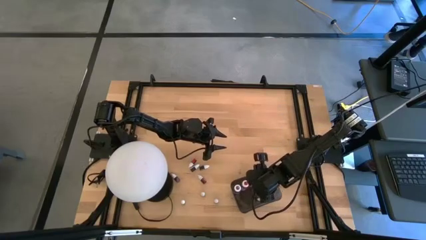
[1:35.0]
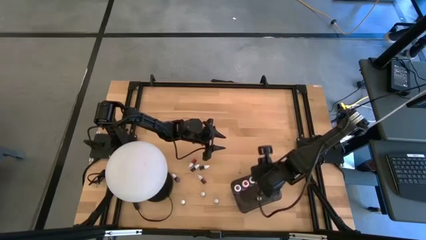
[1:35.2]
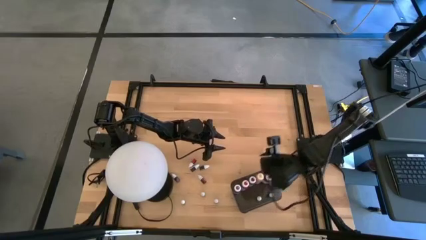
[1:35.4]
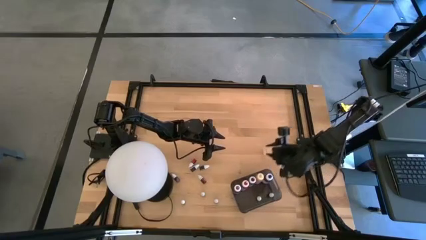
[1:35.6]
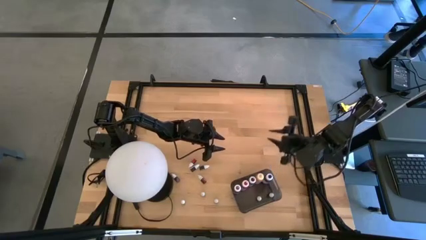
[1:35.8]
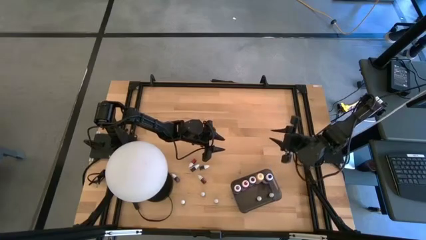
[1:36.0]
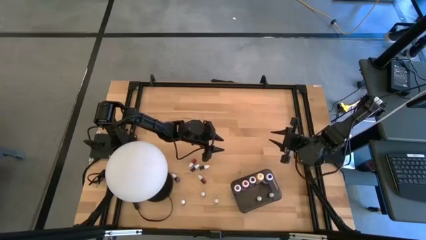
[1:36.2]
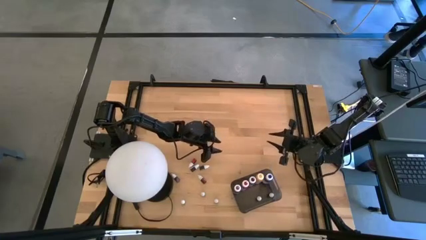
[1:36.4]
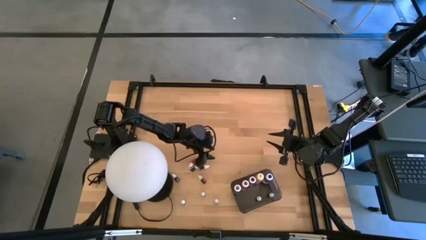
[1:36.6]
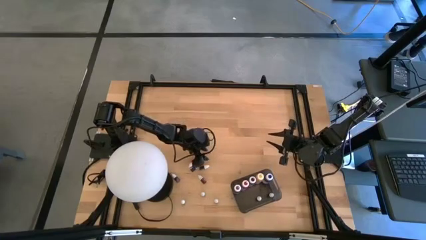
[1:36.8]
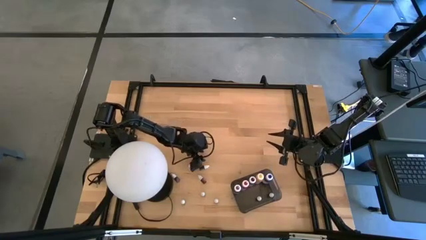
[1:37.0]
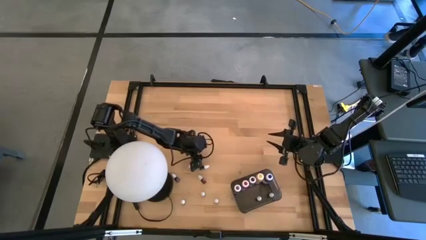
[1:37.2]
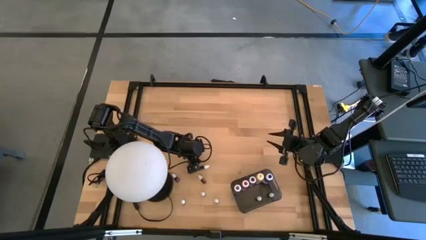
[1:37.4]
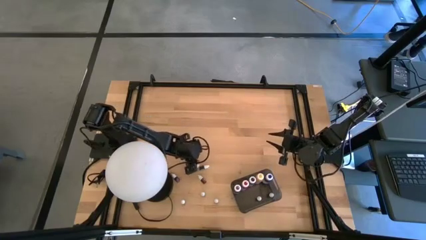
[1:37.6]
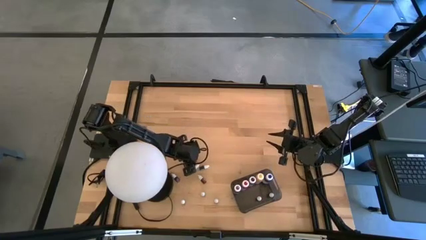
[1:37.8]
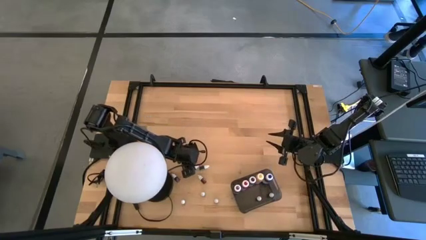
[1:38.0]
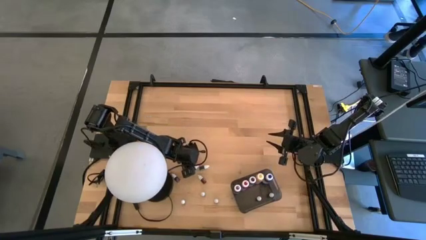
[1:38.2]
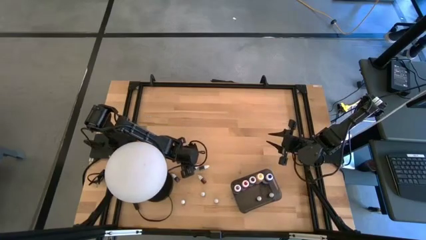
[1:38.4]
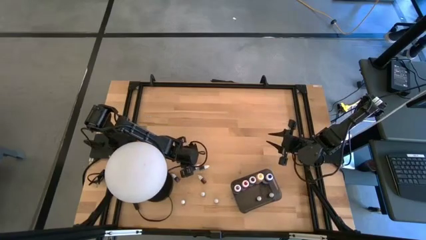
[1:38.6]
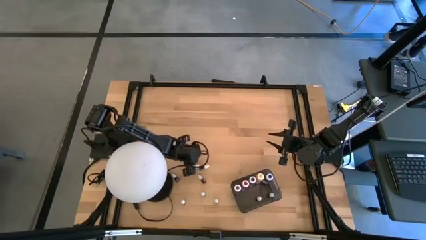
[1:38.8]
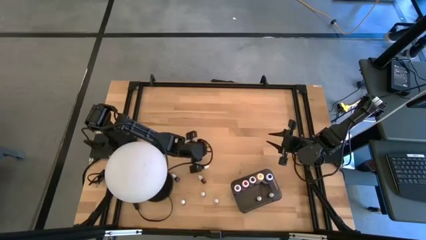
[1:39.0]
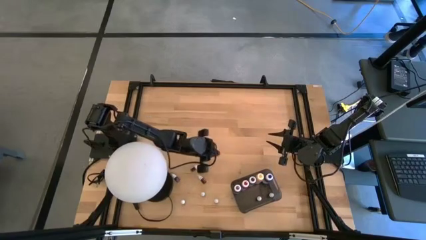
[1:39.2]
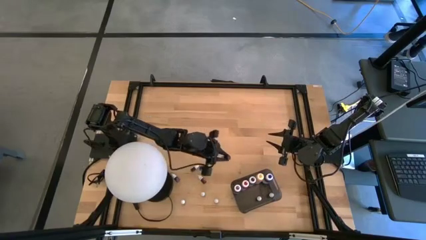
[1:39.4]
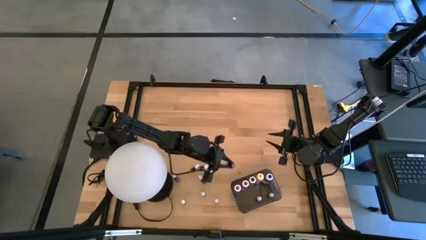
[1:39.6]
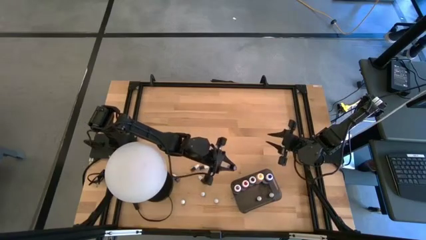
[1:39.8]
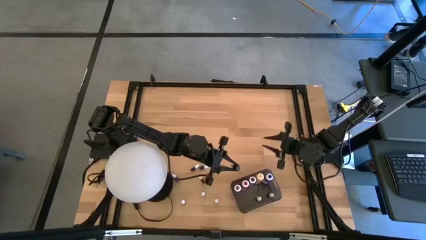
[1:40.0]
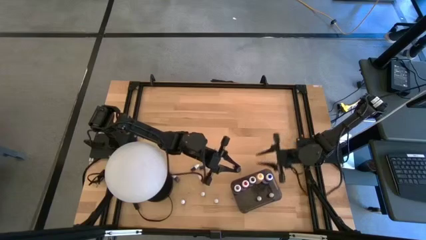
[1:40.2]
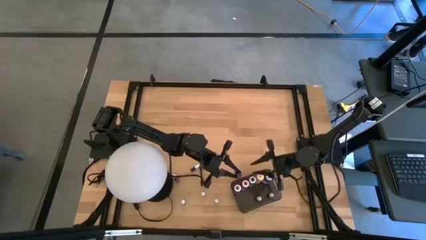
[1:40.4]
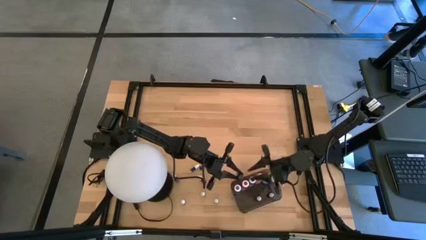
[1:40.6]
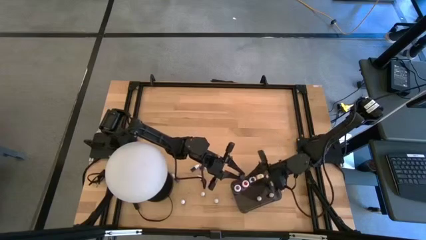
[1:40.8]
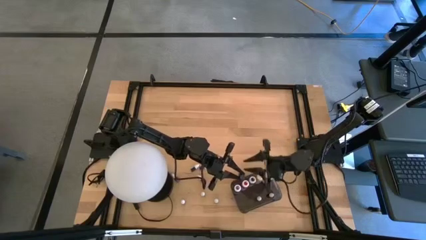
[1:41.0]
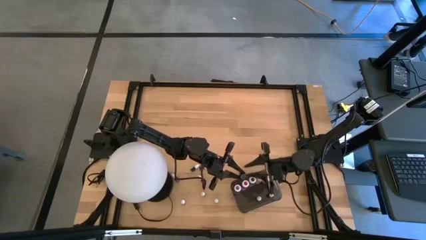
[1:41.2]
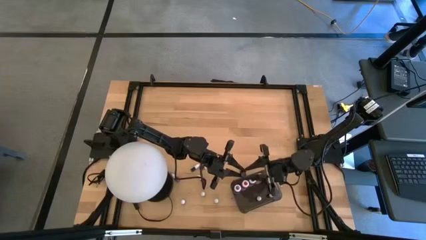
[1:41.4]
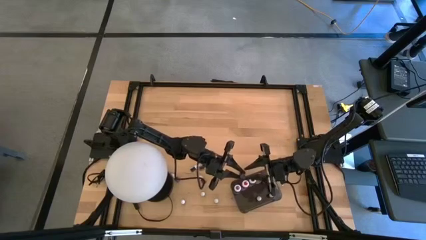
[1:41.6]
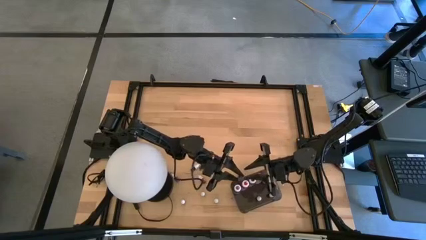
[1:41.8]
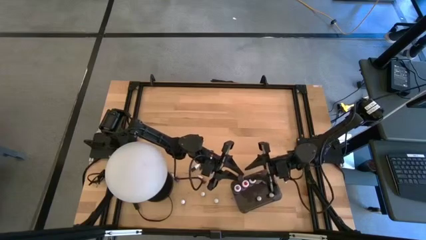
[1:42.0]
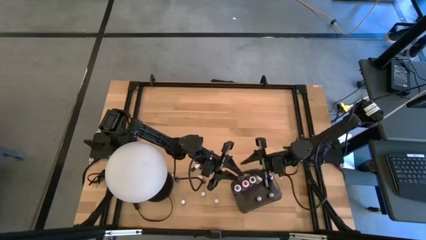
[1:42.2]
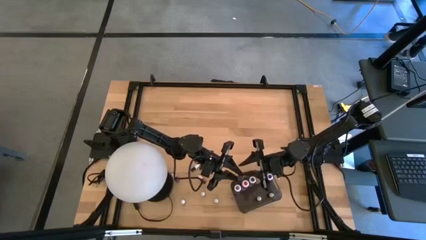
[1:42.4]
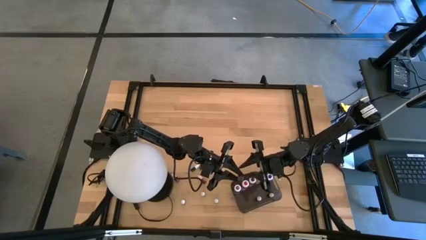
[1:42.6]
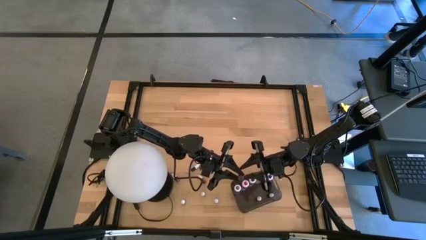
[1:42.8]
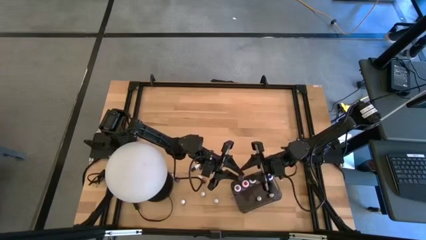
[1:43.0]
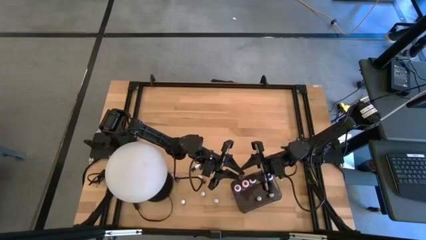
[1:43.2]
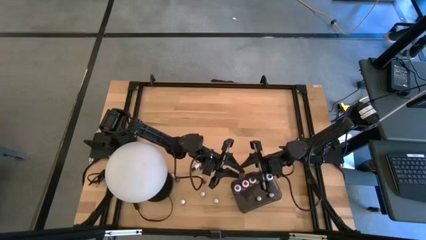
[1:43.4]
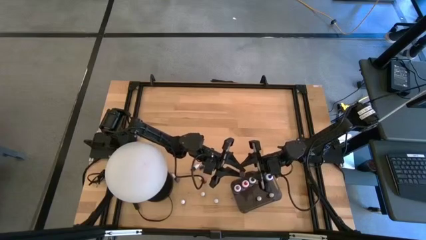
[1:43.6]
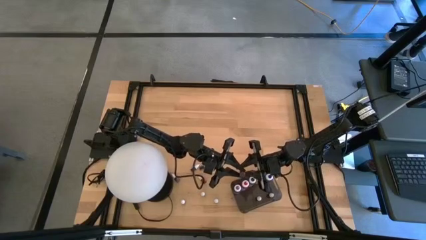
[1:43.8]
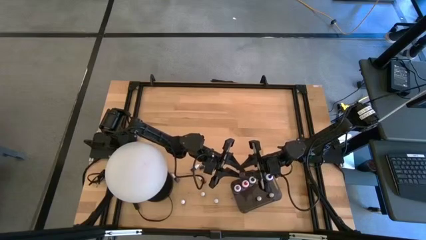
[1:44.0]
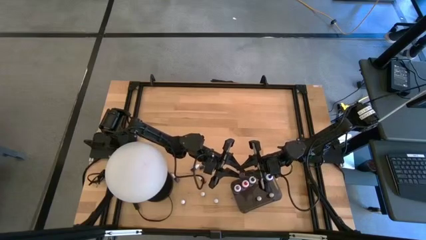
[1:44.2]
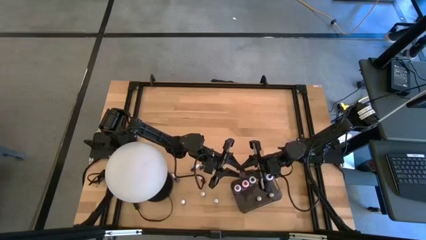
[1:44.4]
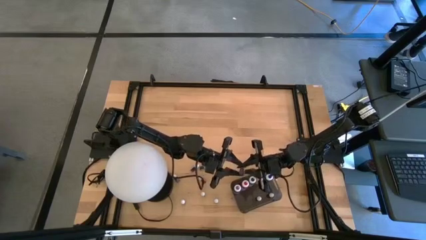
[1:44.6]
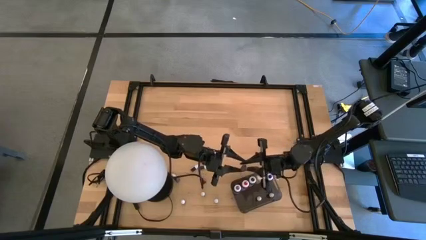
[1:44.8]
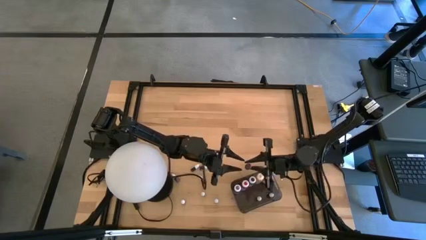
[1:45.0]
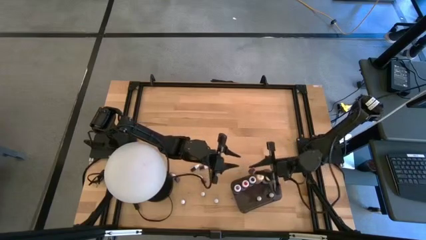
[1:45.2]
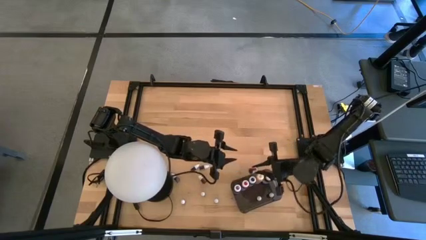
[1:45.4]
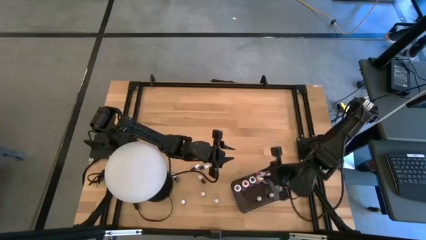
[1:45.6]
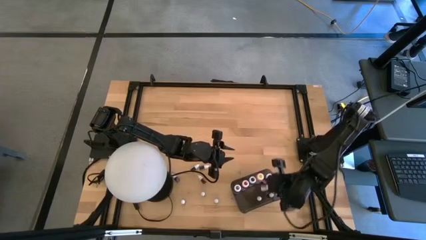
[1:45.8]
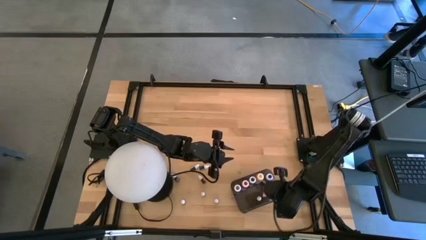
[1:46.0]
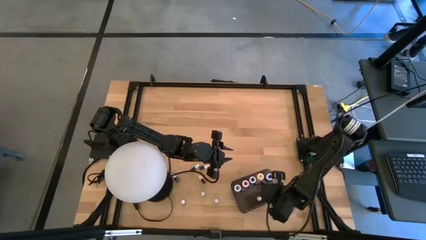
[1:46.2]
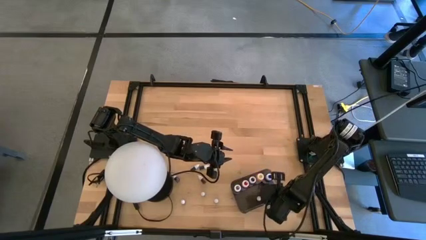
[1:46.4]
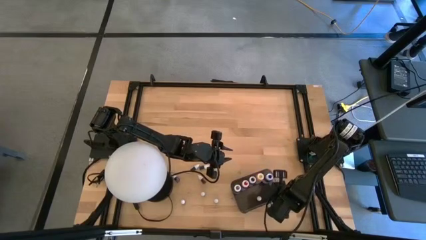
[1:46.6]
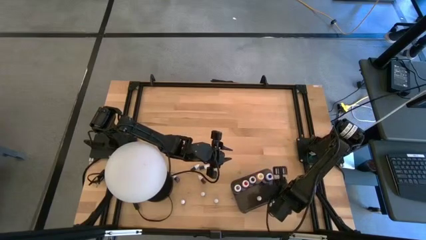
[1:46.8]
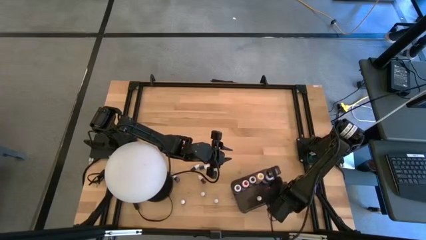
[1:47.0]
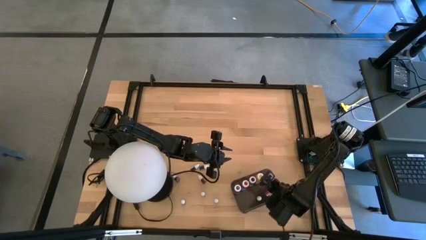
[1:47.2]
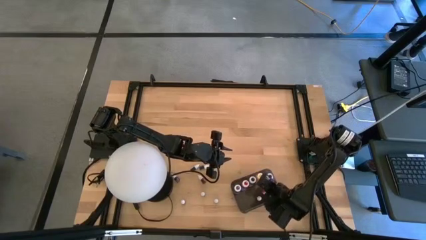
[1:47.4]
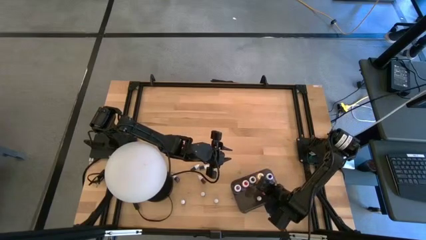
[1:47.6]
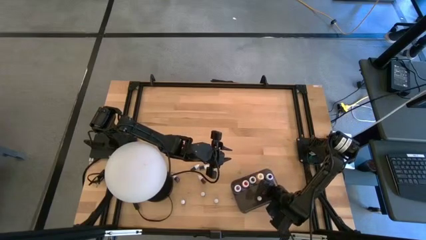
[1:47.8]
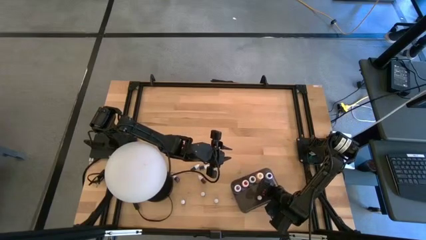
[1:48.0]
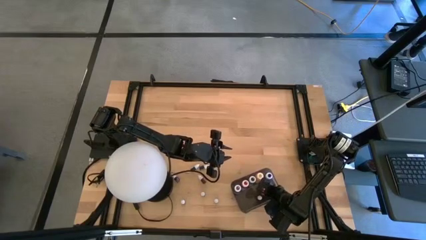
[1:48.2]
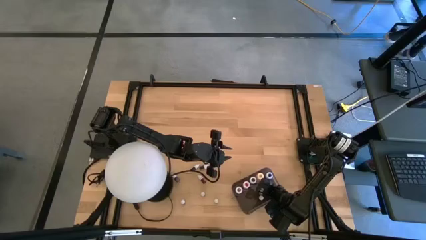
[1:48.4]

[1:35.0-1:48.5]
Task: Pick & Place food coloring
Put the left small red food coloring bottle into the bin

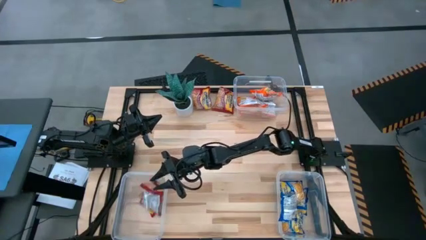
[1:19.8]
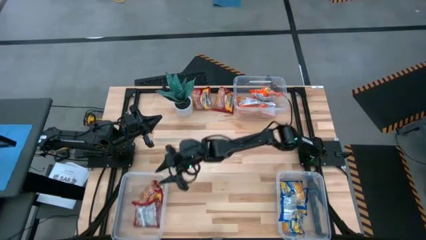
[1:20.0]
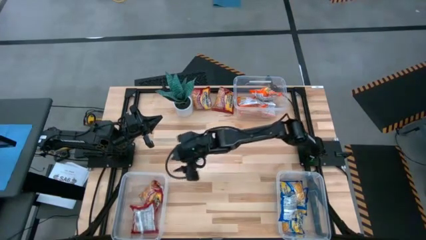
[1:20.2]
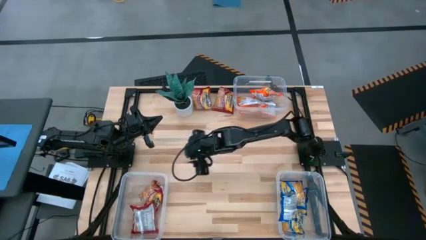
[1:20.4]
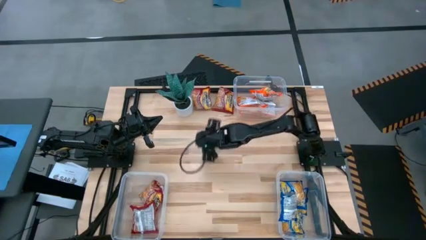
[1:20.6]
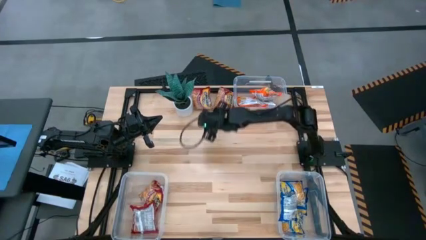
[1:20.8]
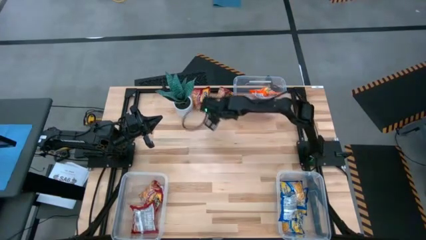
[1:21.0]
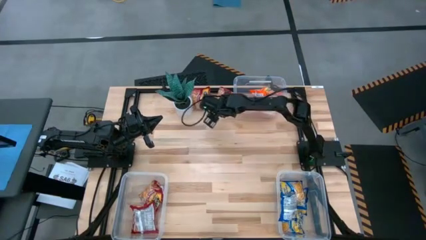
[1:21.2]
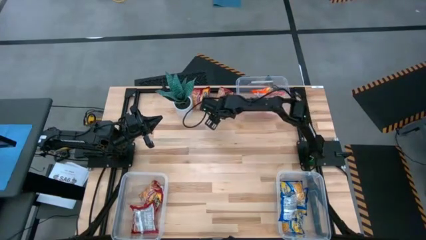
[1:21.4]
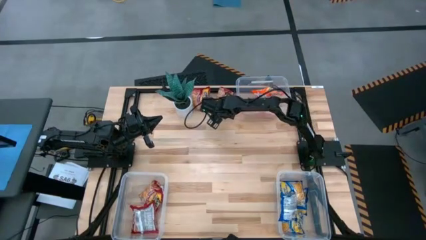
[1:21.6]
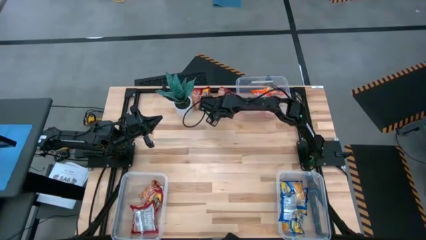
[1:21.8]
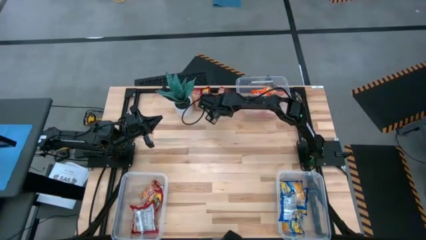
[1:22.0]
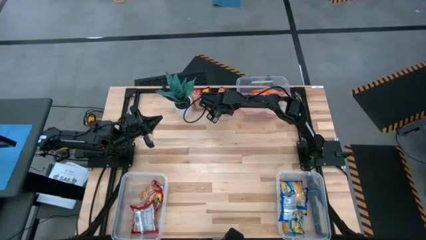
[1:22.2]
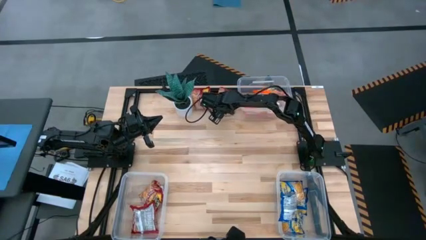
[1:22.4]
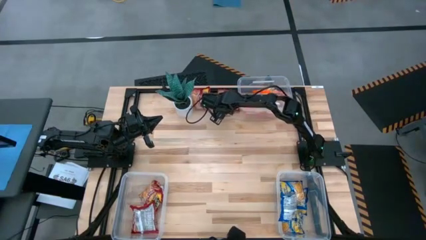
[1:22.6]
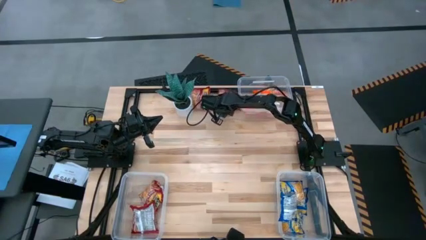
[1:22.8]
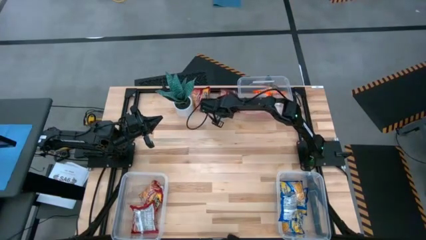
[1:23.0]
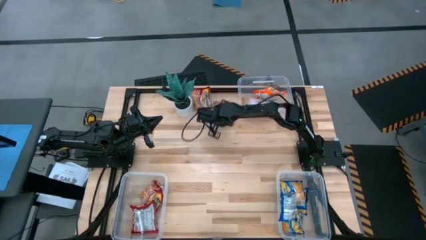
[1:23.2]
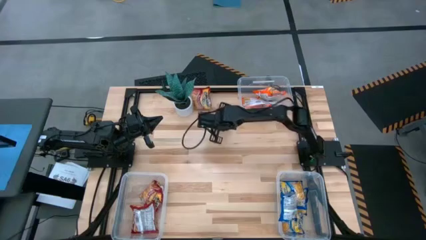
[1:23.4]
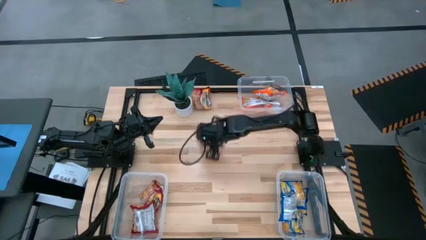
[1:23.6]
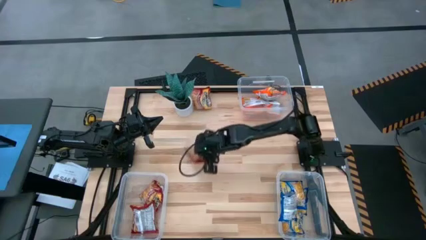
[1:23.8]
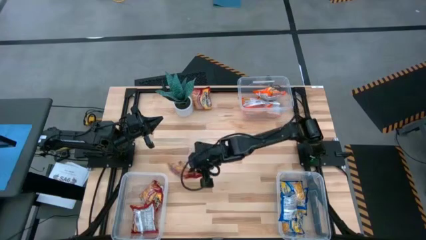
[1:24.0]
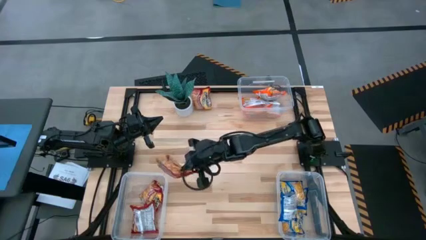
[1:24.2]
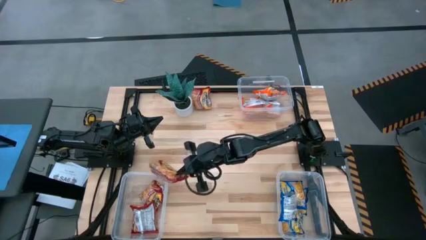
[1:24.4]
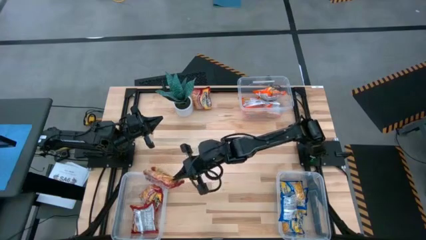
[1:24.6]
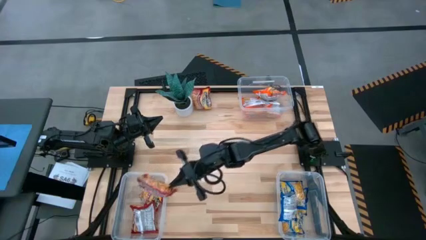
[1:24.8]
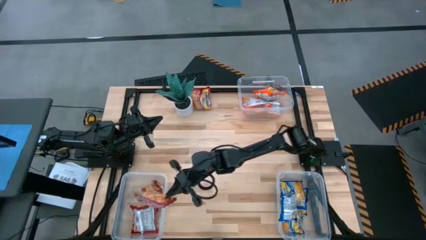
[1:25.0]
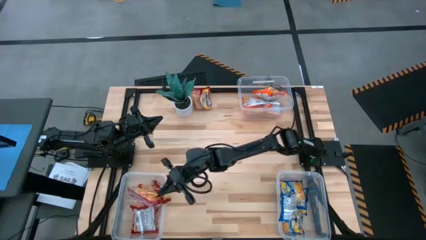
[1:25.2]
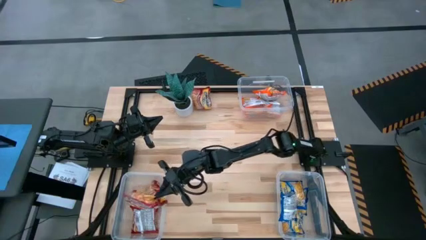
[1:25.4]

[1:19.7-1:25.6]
Task: Sort Maruchan noodles
Put the red noodle pack into the bottom left transparent bin
